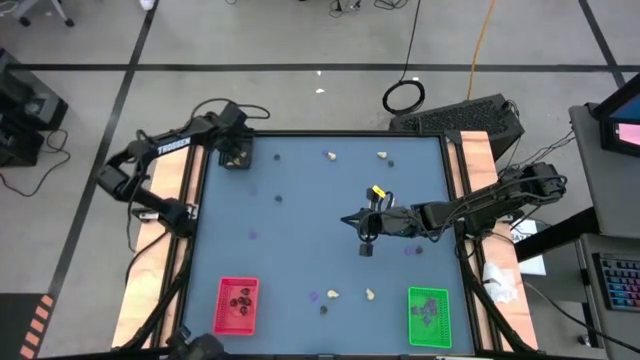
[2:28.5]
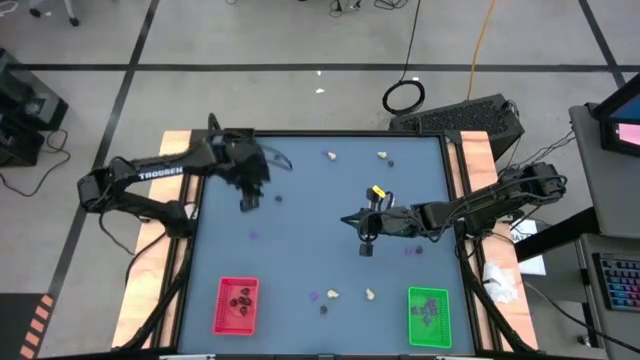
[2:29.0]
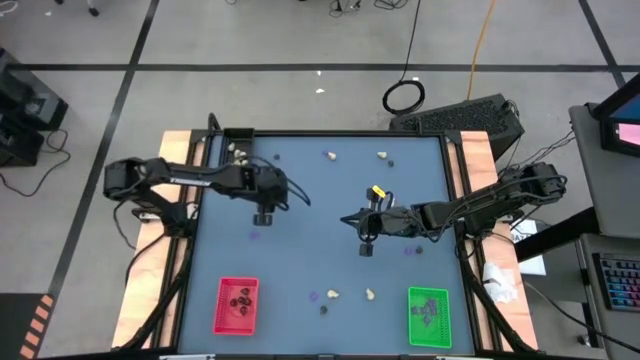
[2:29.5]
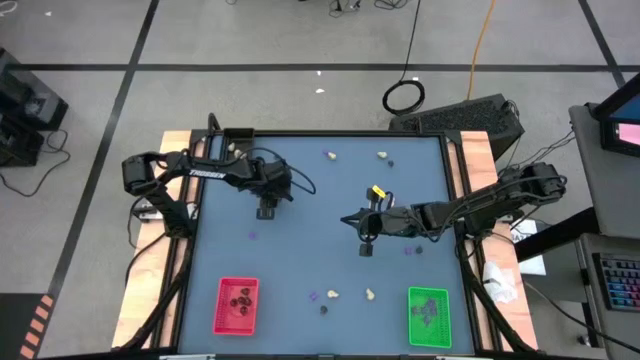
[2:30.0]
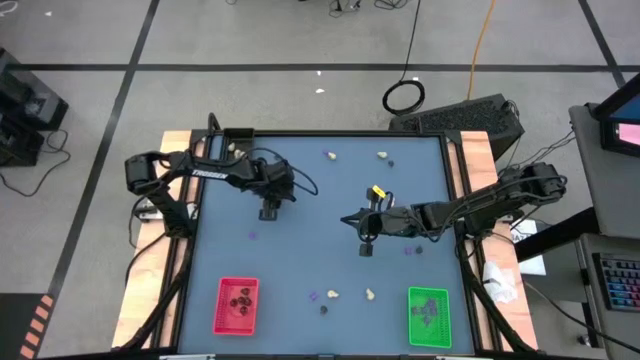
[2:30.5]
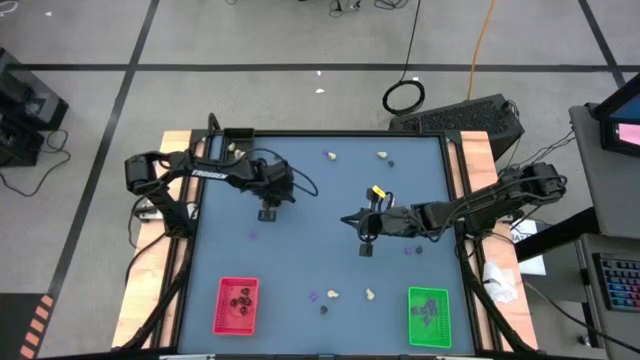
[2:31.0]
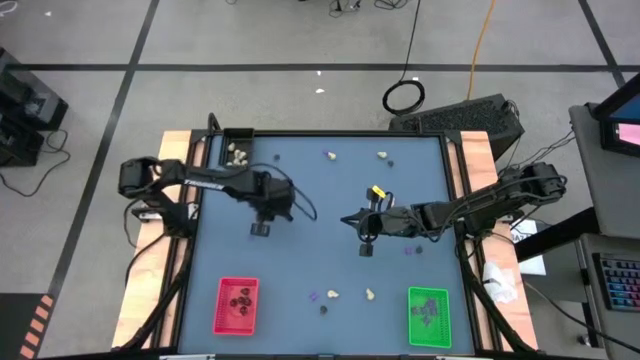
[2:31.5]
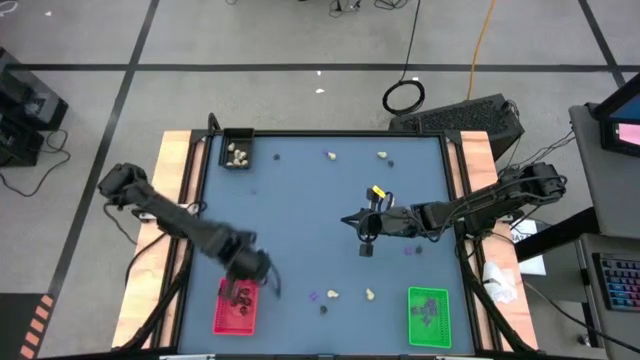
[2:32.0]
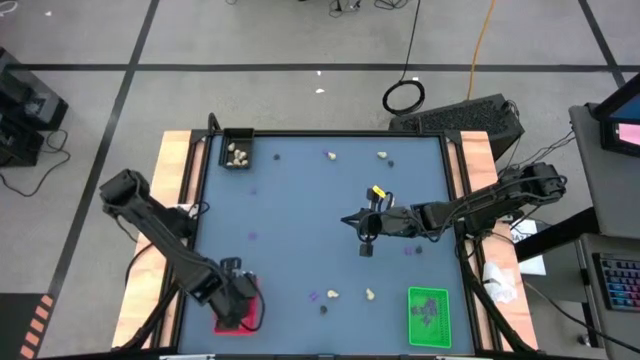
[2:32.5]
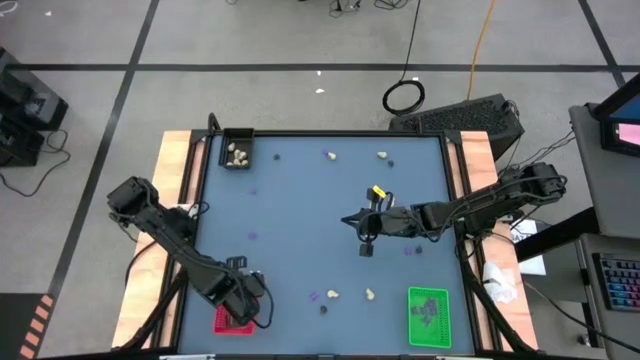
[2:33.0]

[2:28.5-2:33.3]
Task: Sort Halloween decoration
Put the black skull toy into the red bin

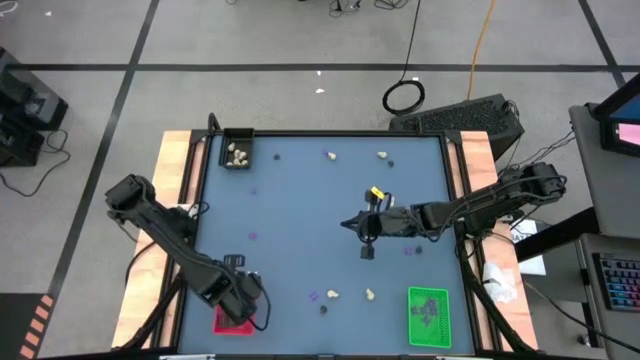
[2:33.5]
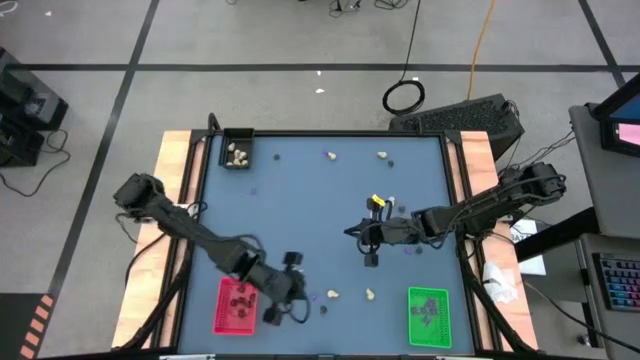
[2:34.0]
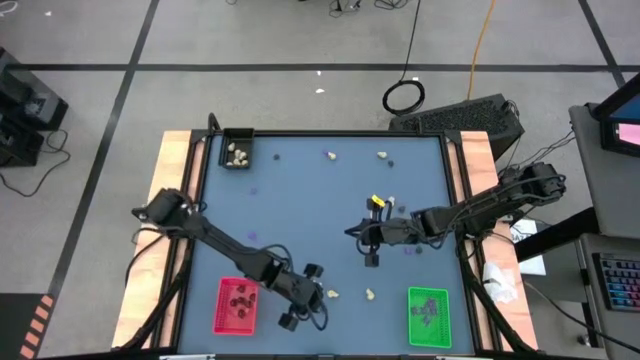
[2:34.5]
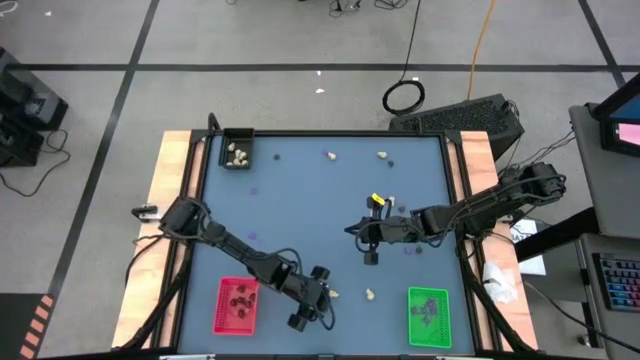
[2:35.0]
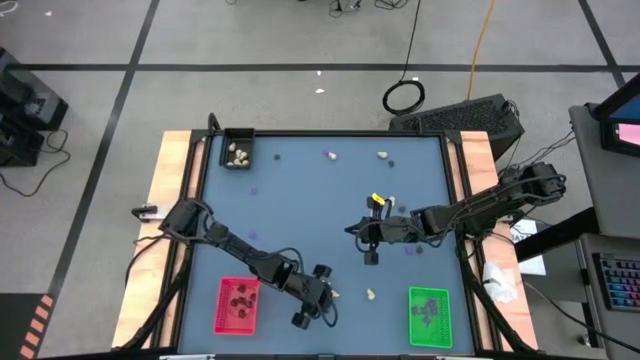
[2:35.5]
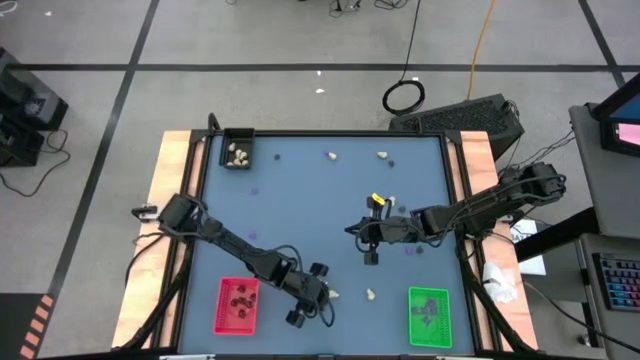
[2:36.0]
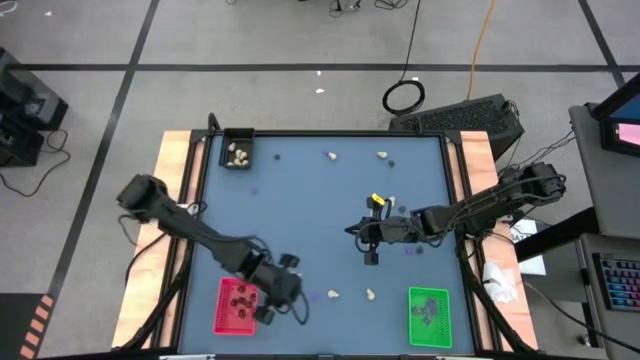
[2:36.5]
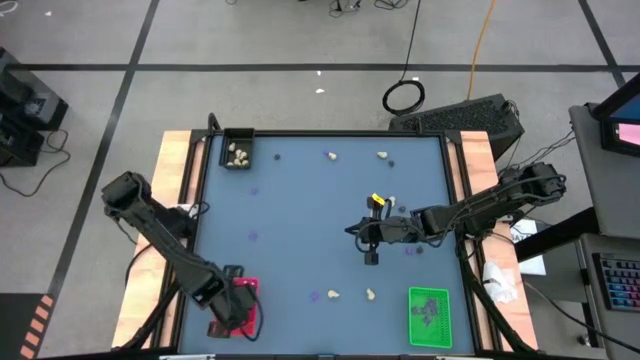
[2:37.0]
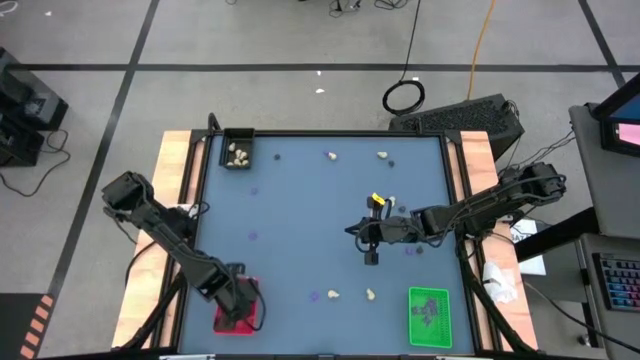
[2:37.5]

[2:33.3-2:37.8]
Put the black skull toy into the red bin

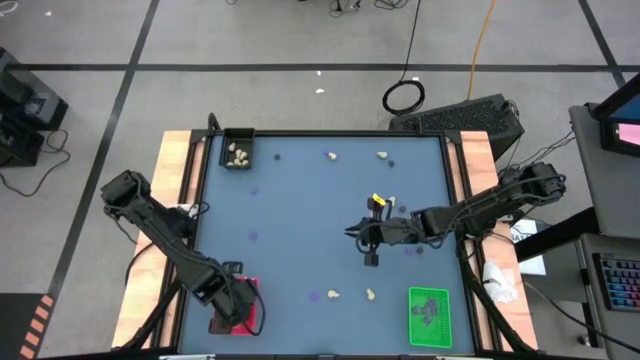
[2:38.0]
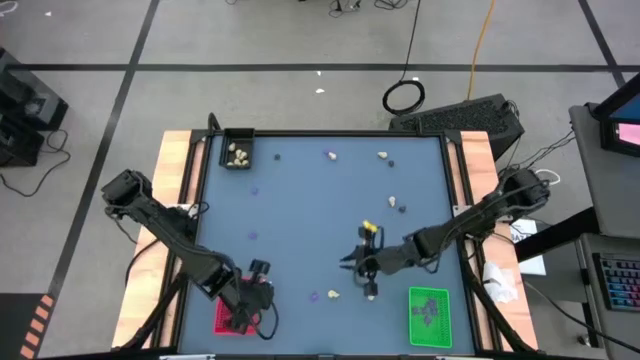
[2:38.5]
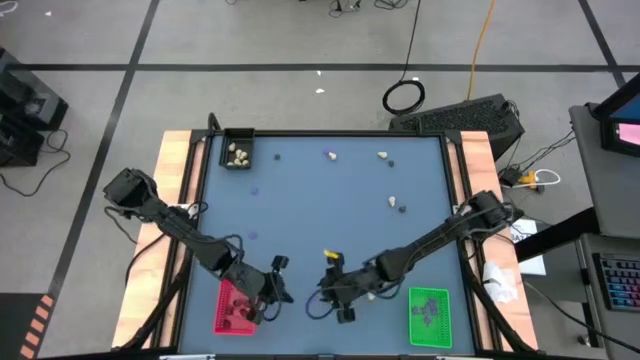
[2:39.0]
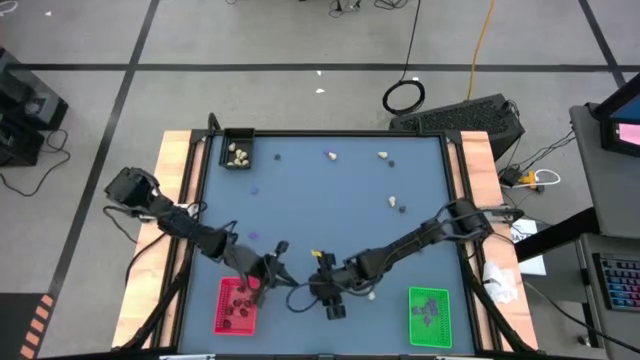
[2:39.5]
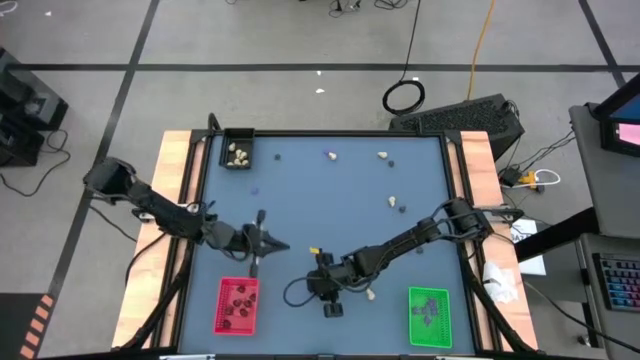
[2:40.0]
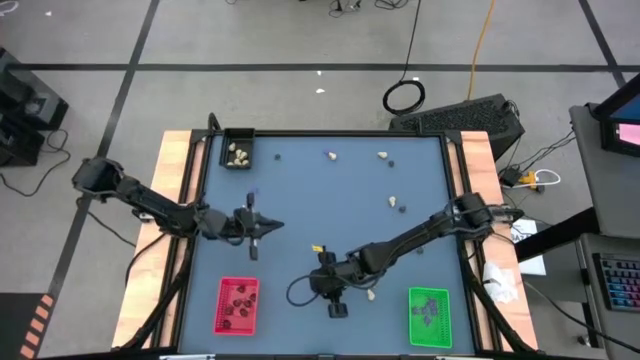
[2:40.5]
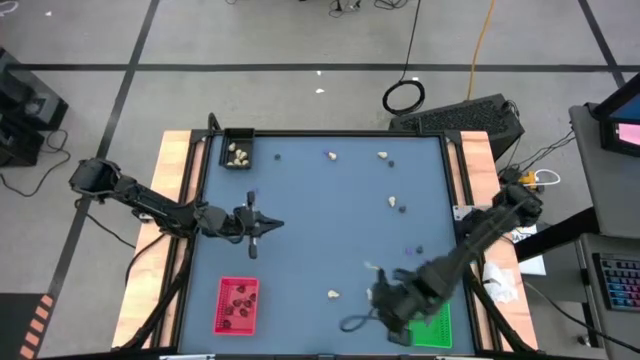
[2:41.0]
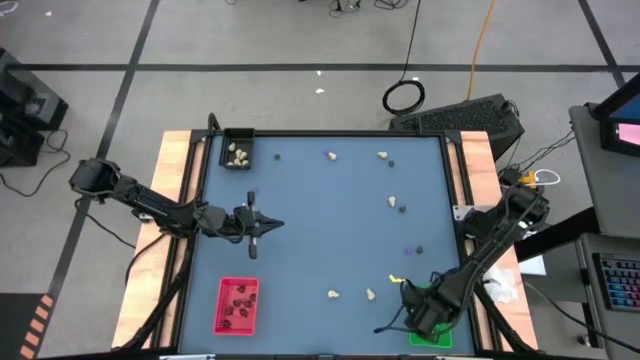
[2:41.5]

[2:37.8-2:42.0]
Put the violet spider toy into the green bin

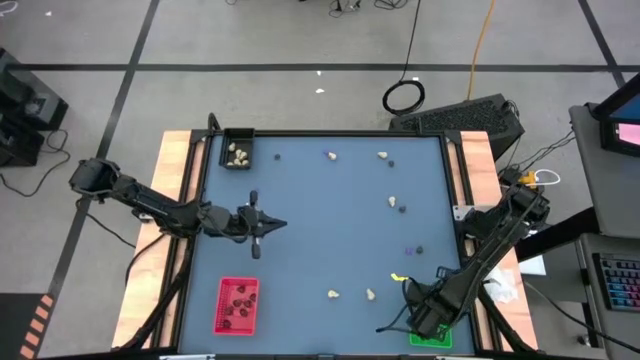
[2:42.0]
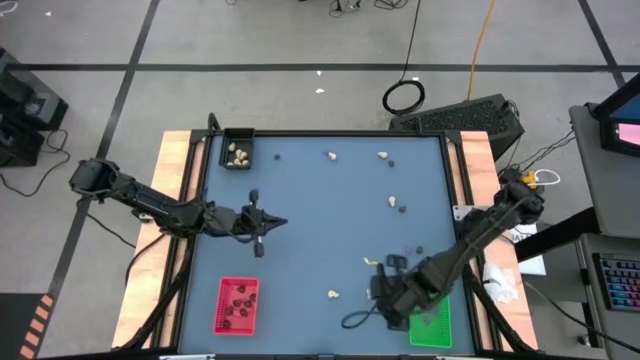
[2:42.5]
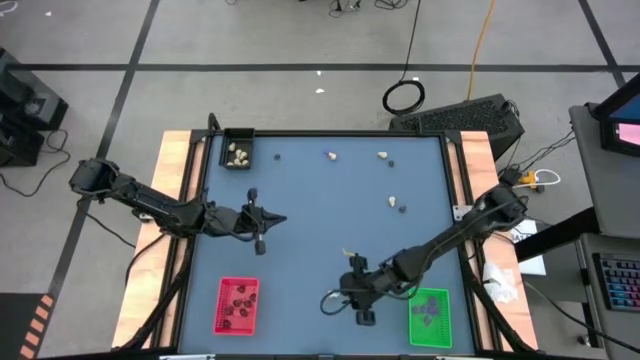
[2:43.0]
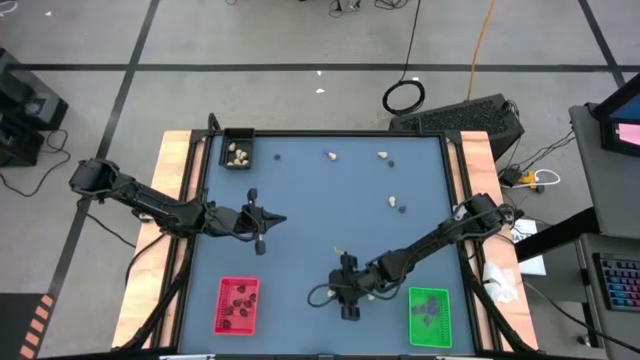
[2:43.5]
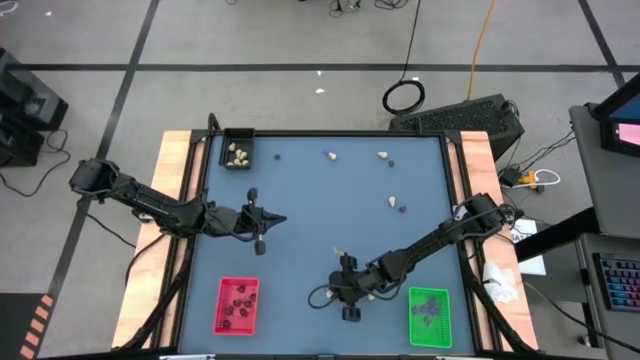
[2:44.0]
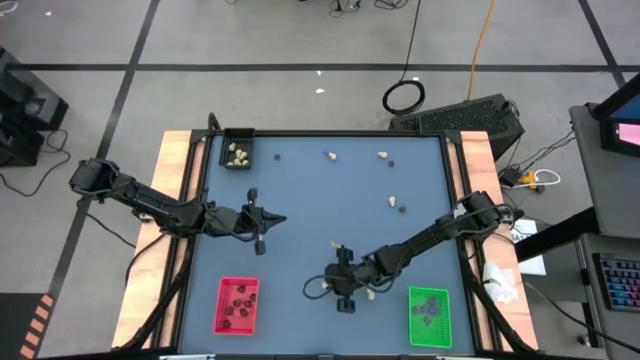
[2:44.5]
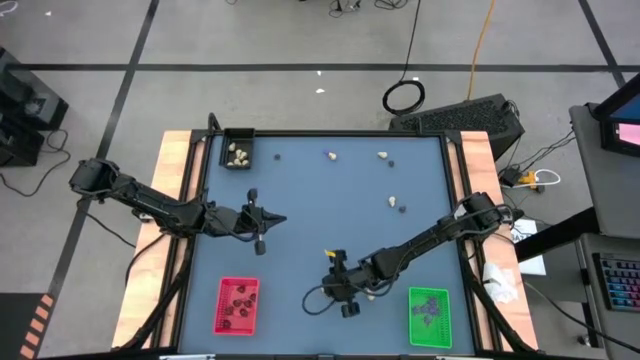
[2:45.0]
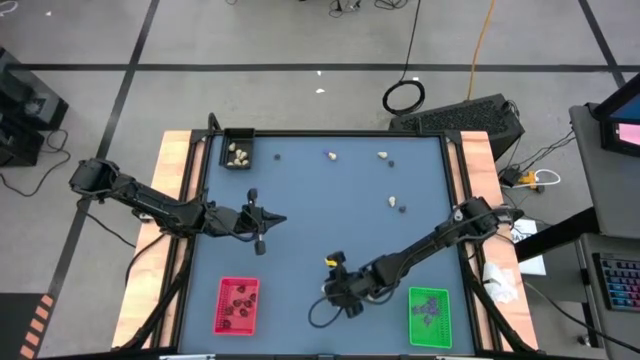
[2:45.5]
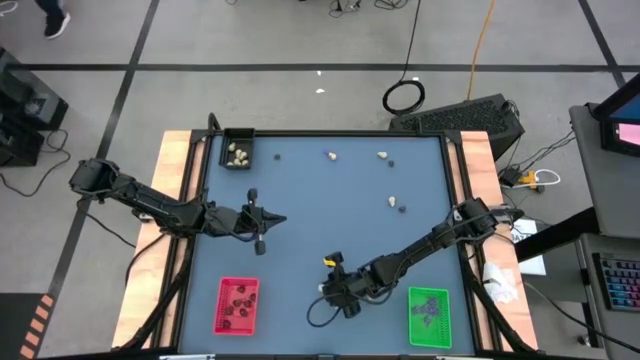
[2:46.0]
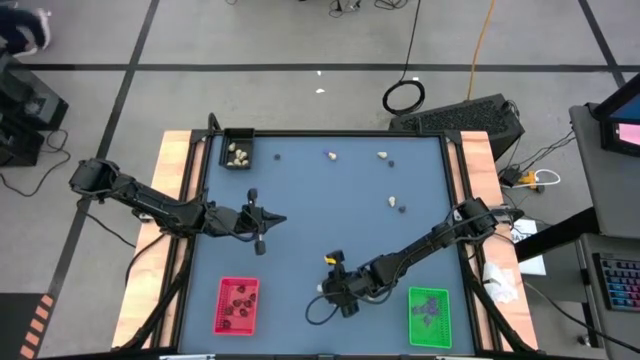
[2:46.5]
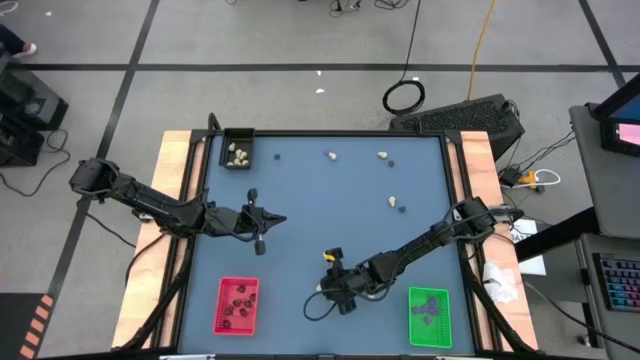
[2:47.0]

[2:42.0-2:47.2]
Put the white skull toy into the black bin

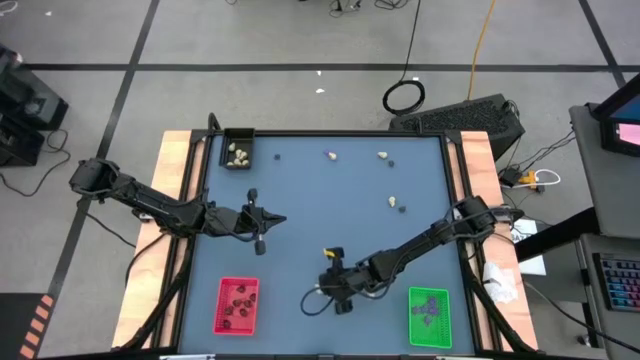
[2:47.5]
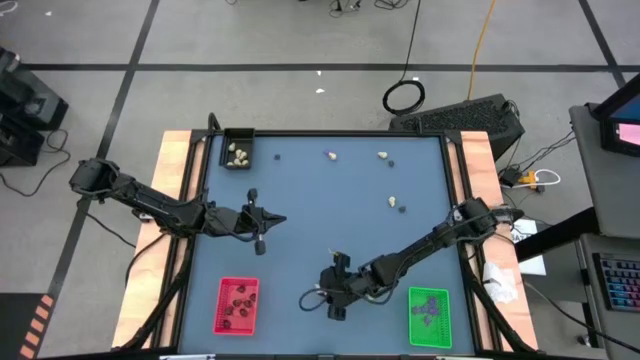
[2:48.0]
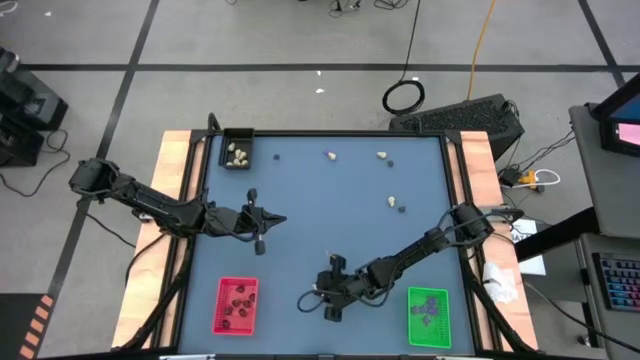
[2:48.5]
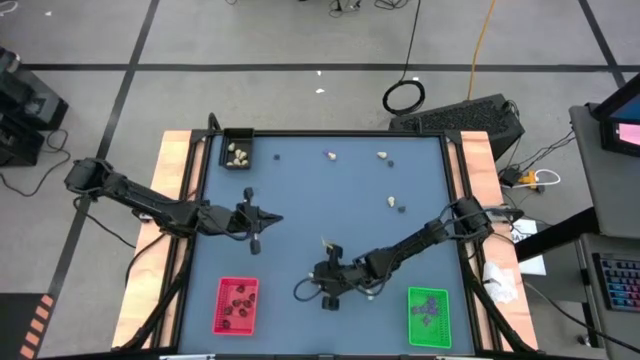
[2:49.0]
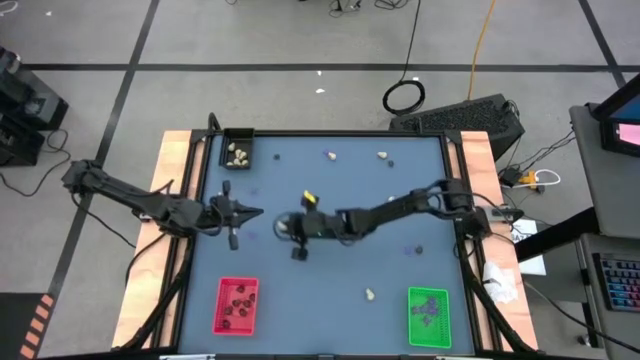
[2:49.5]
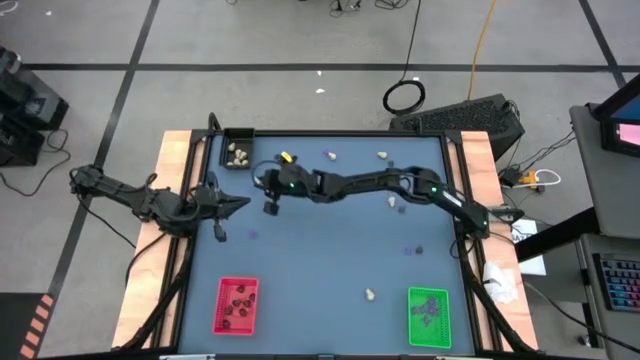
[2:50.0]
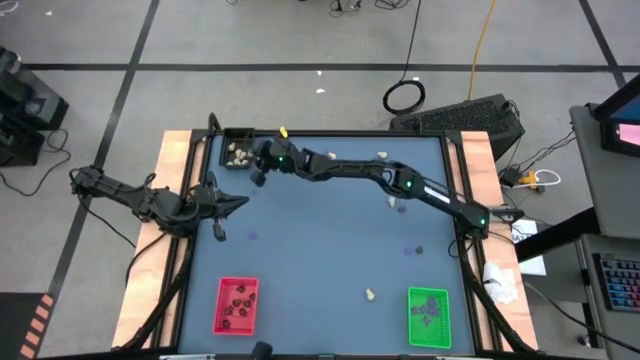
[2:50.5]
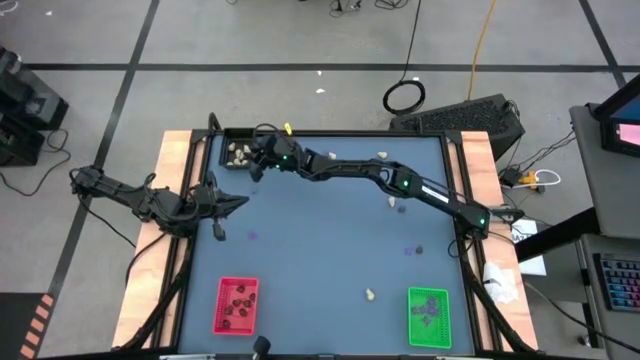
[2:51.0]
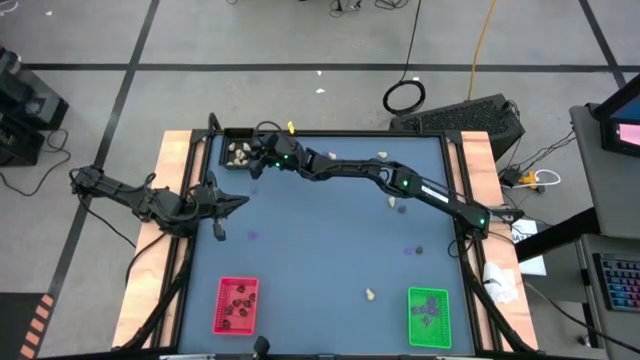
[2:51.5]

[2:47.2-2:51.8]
Put the white skull toy into the black bin
